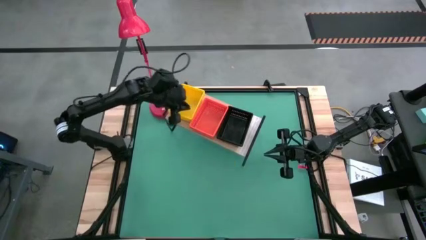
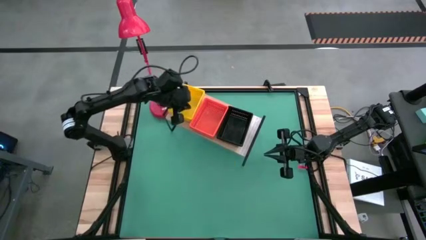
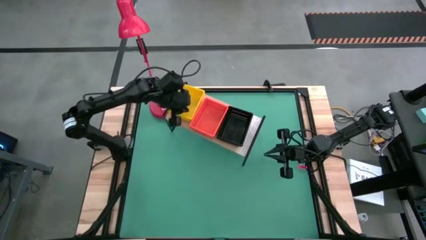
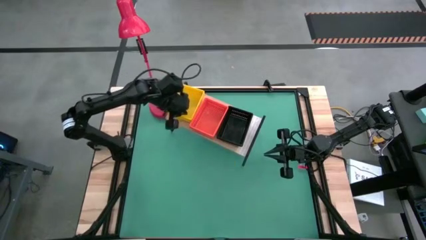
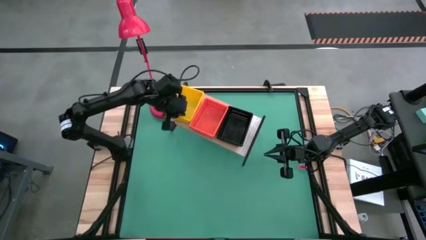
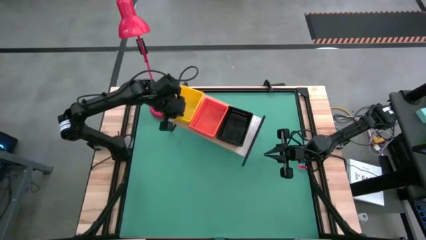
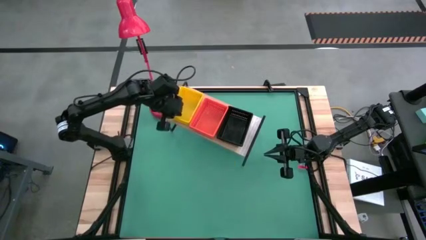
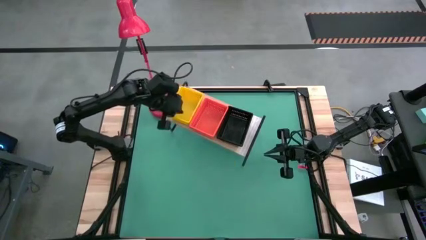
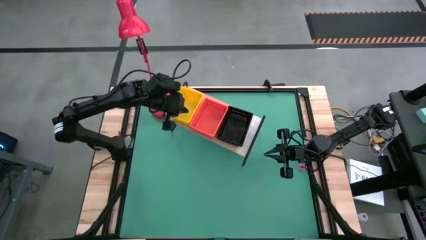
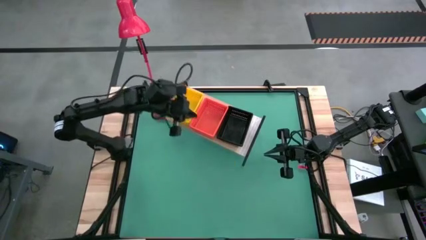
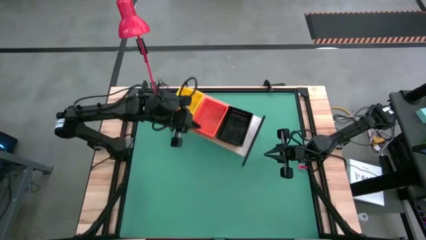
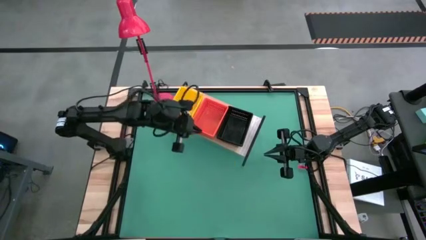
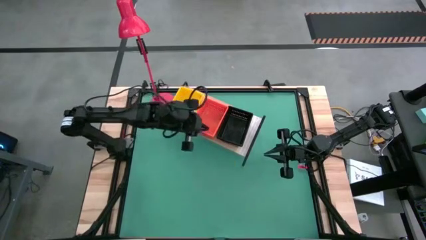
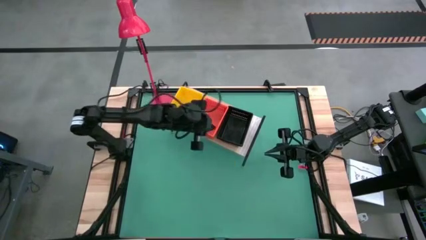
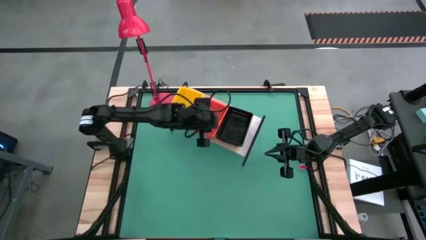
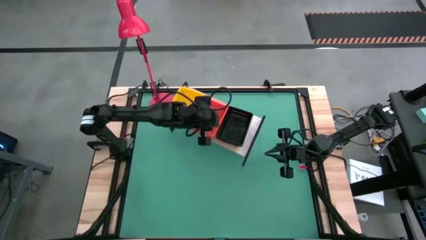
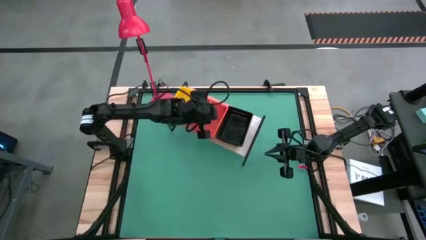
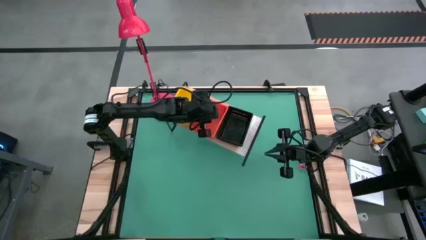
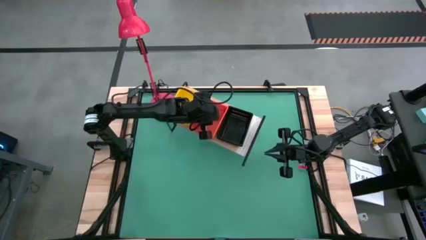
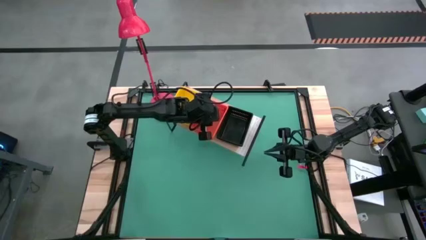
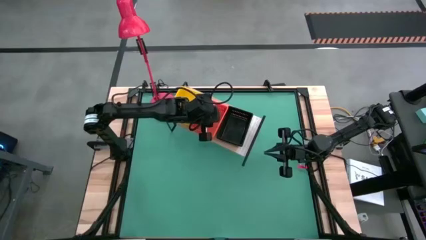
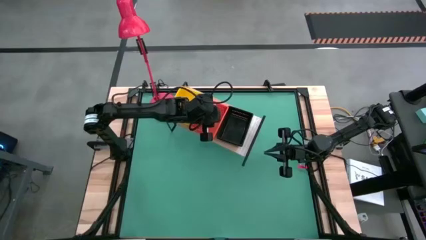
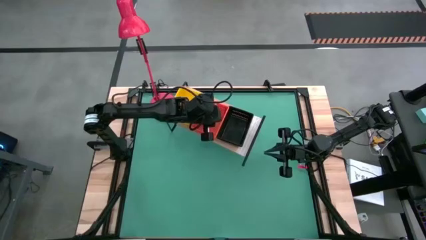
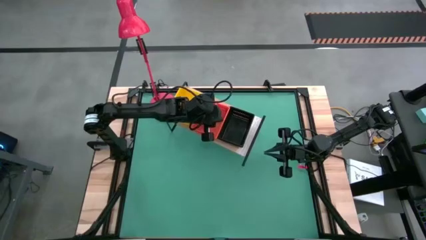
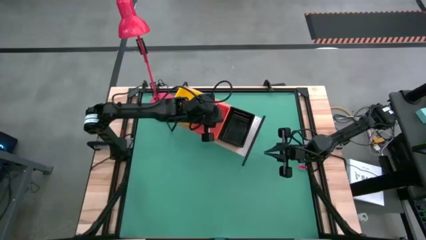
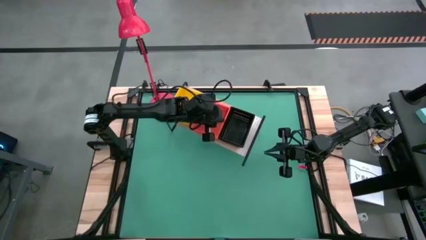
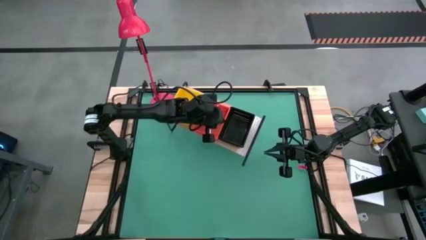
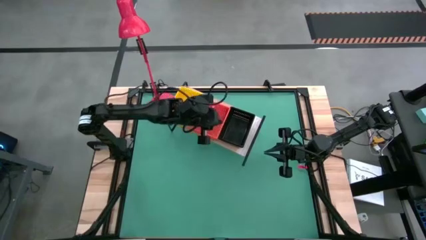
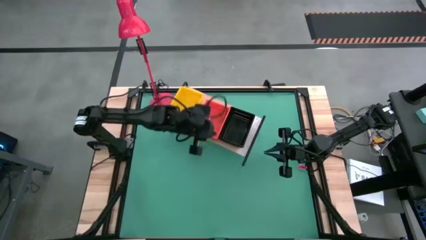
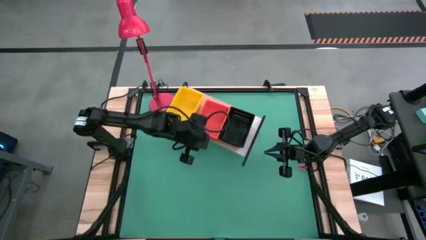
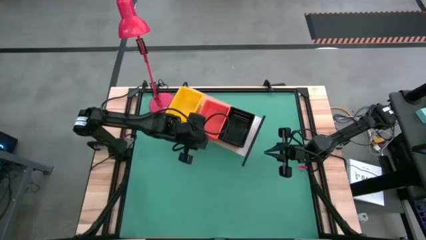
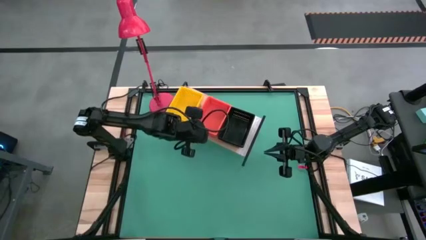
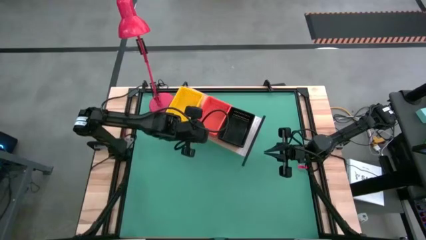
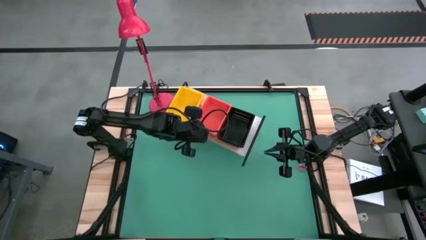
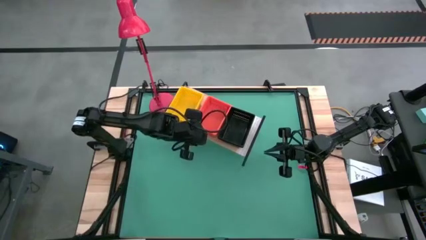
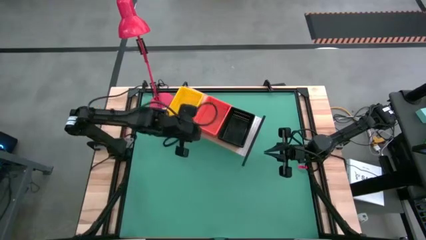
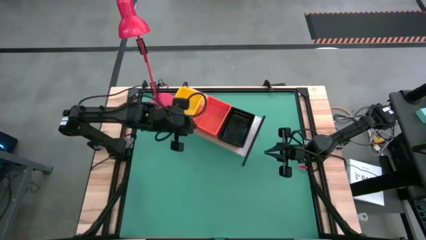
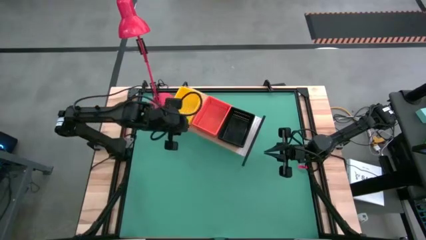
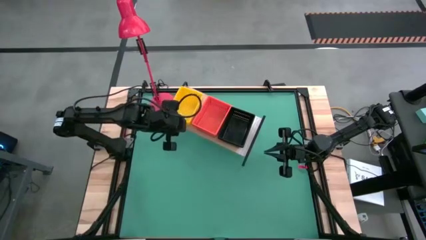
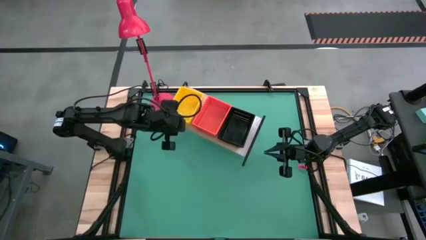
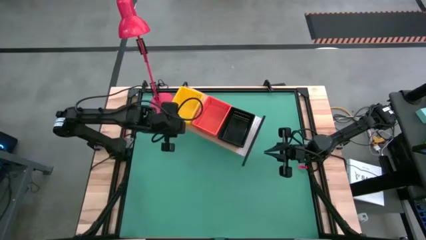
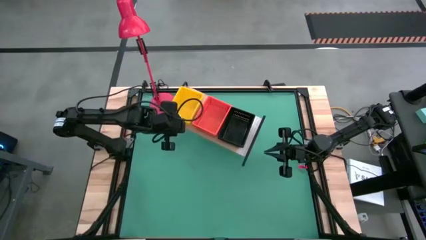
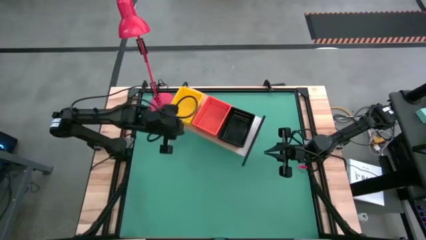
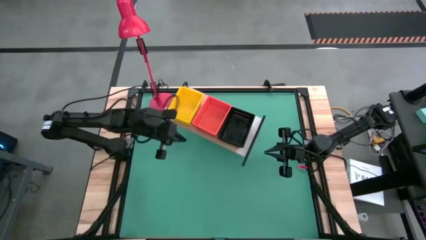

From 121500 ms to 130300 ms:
Task: Stack baskets on shelf by color
Adjust the bins on the shelf

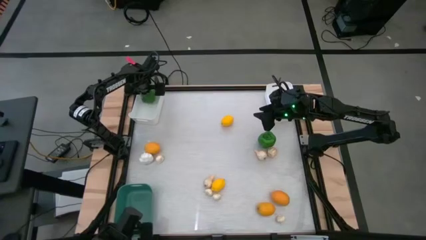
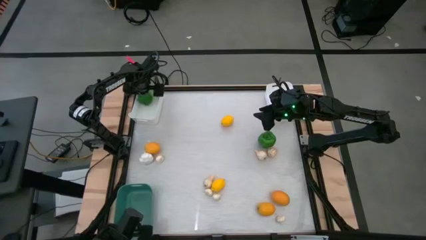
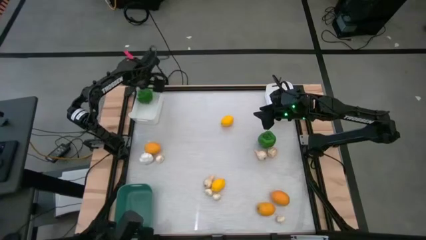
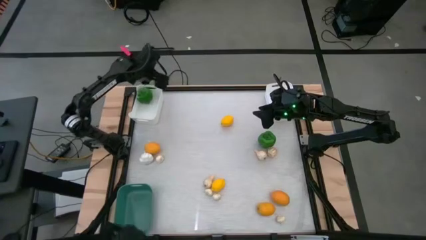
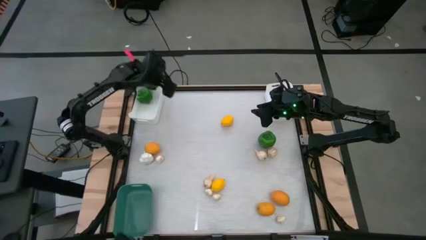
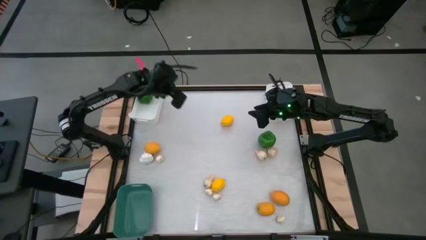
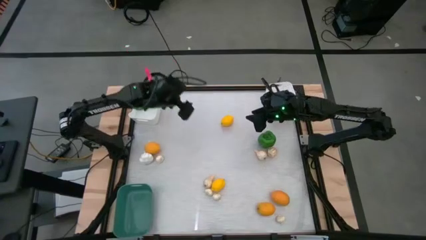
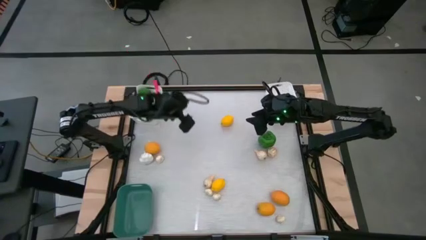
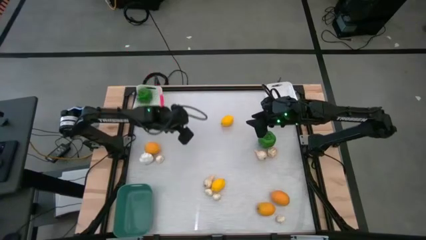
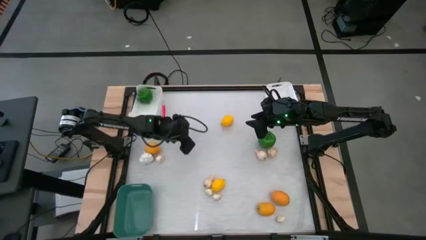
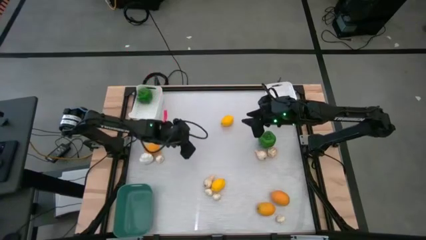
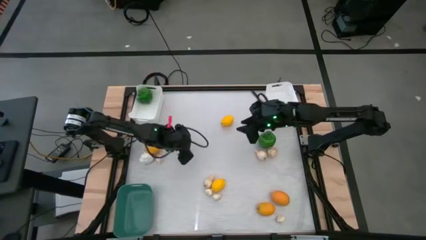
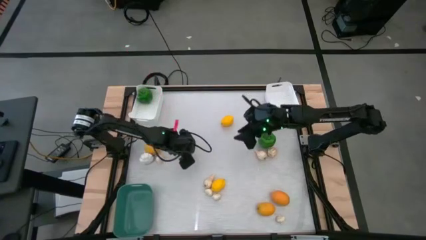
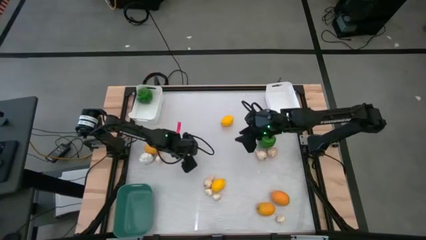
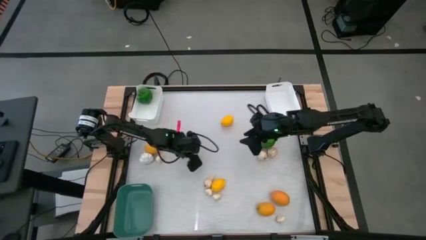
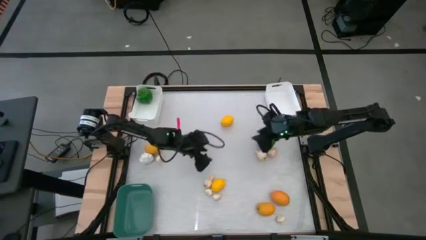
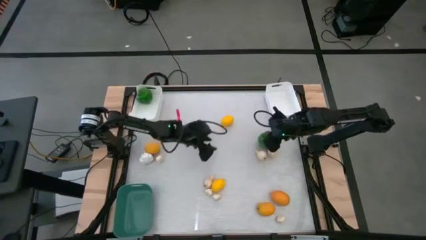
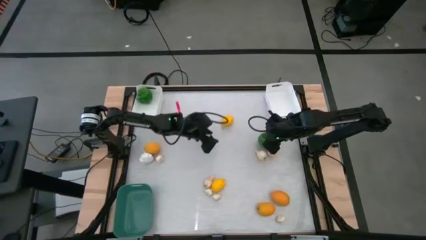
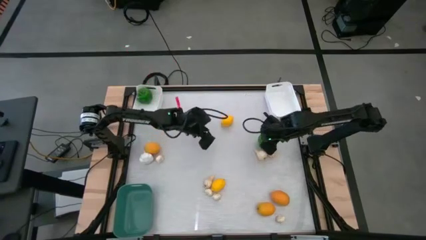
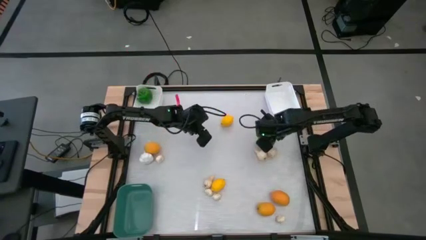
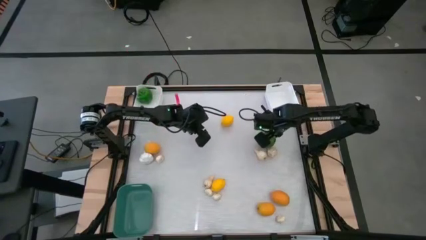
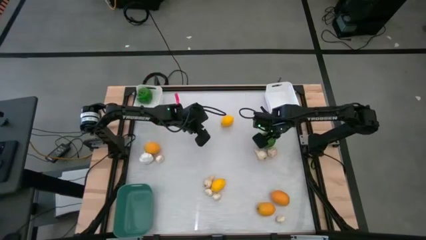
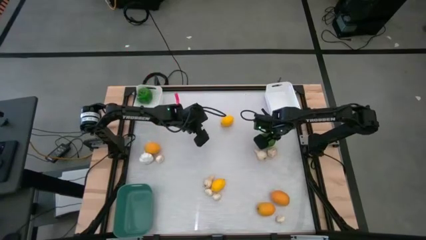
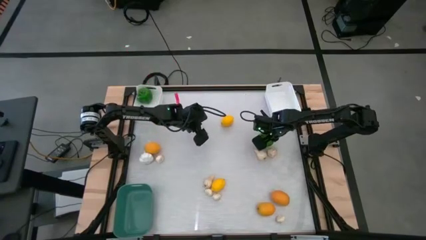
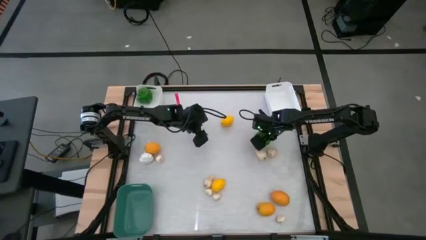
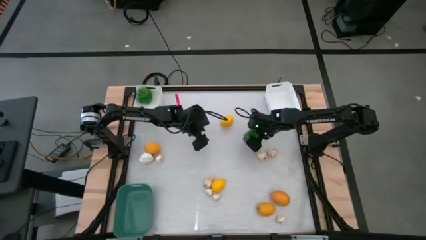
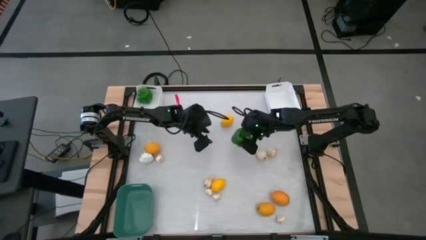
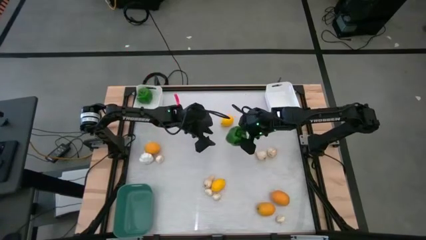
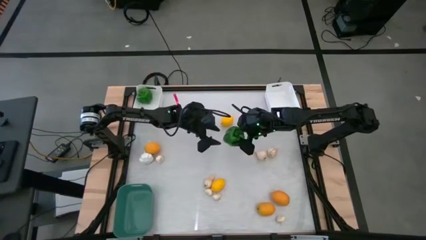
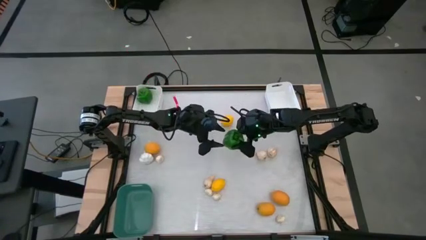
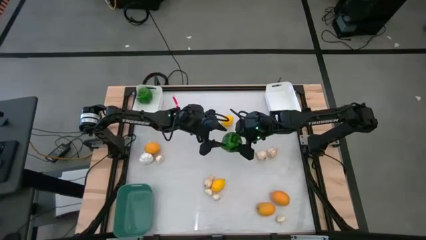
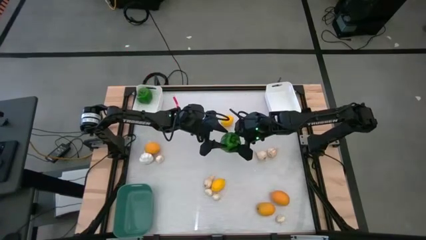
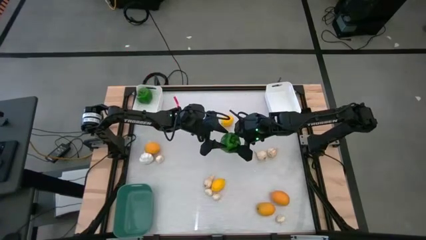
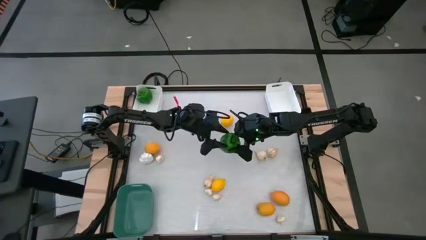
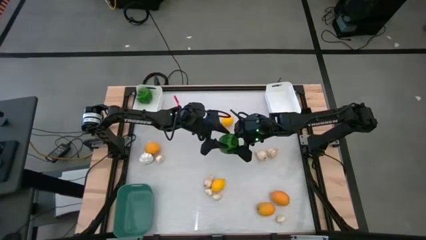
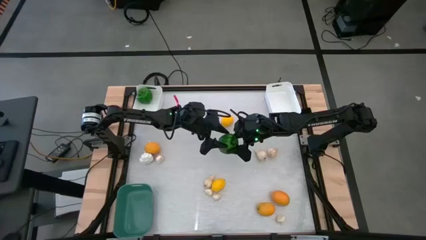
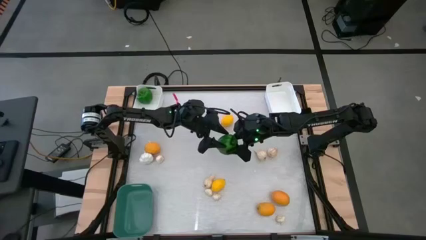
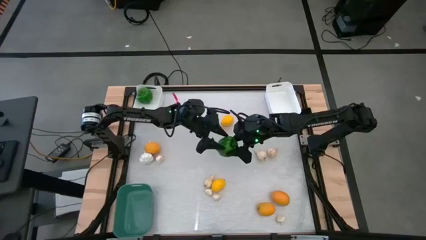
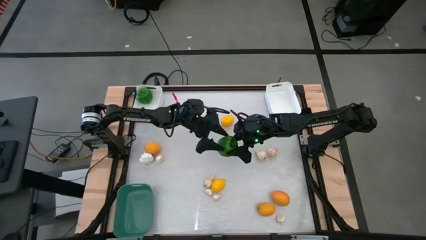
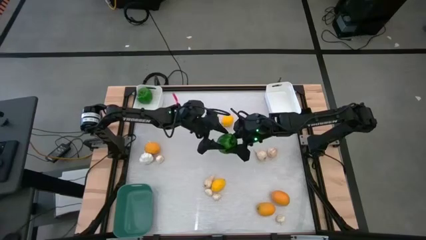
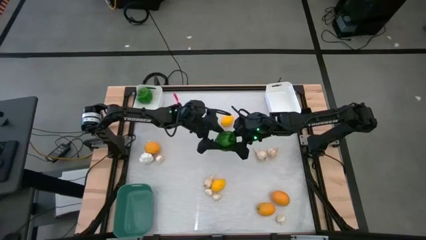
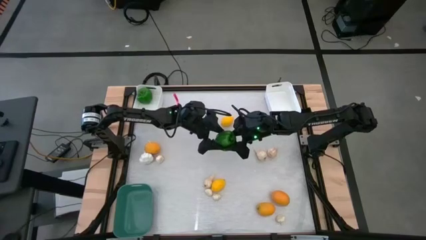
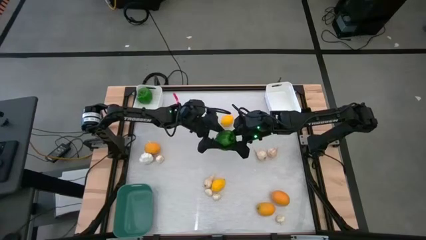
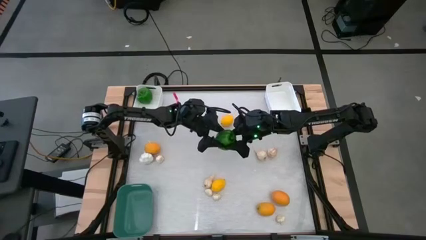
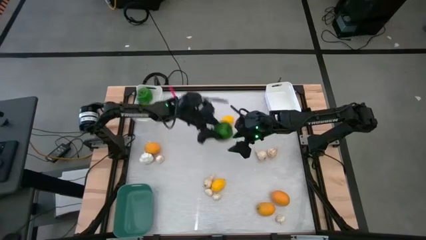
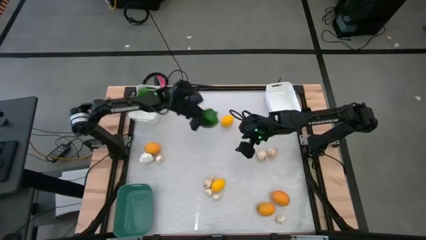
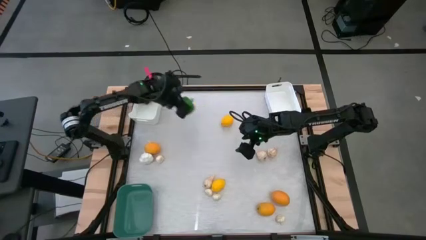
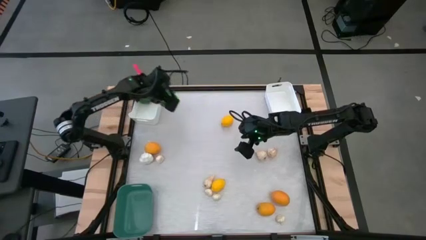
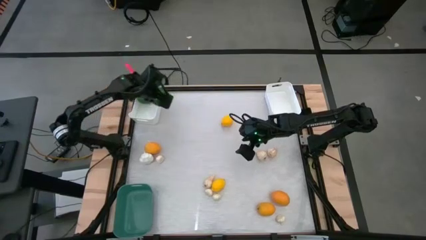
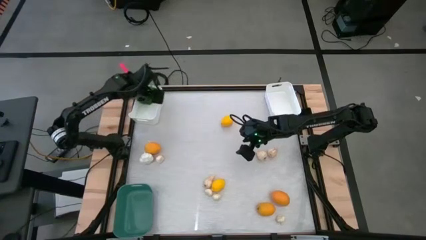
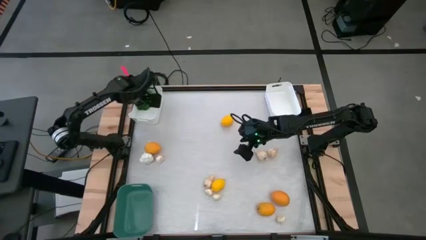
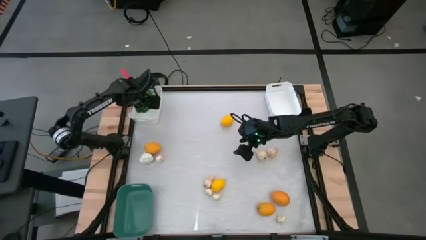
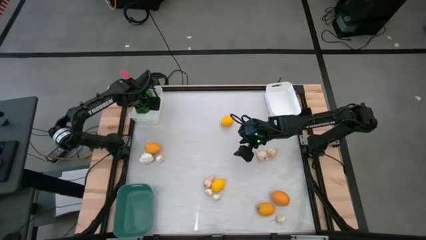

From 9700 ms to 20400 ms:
Task: Sort produce into baskets
Put the green bell pepper into the left white bin
